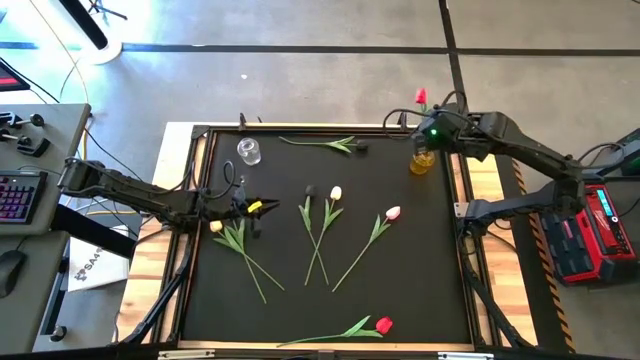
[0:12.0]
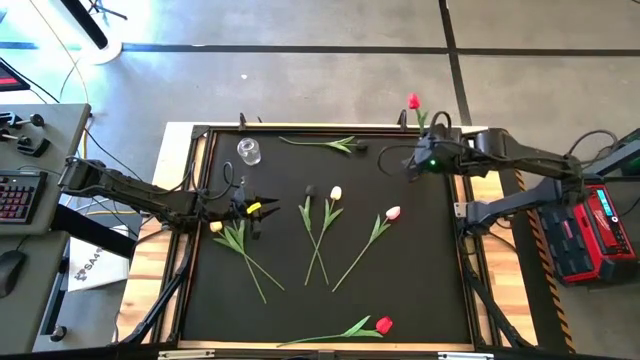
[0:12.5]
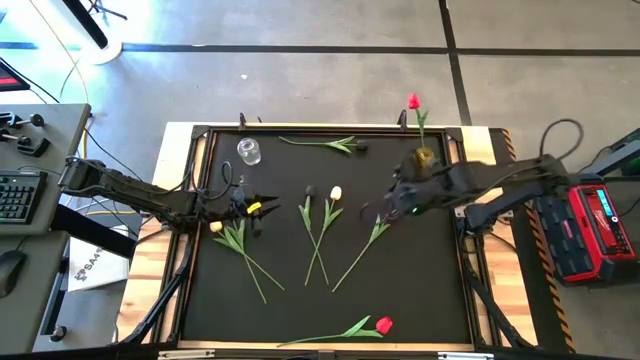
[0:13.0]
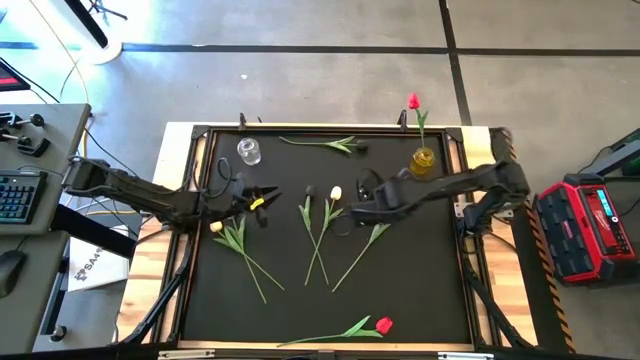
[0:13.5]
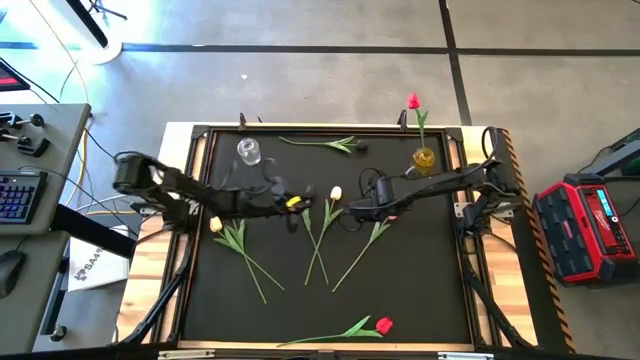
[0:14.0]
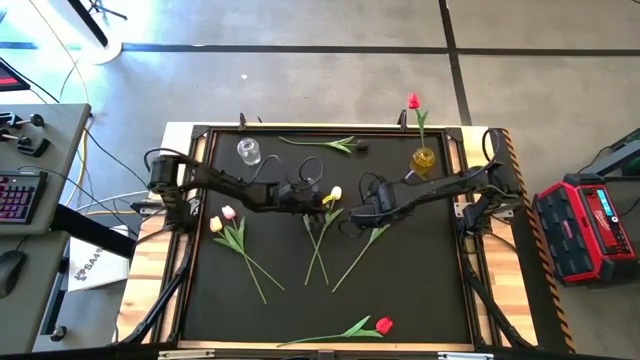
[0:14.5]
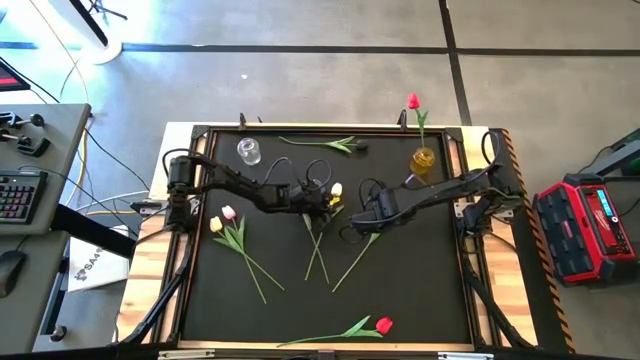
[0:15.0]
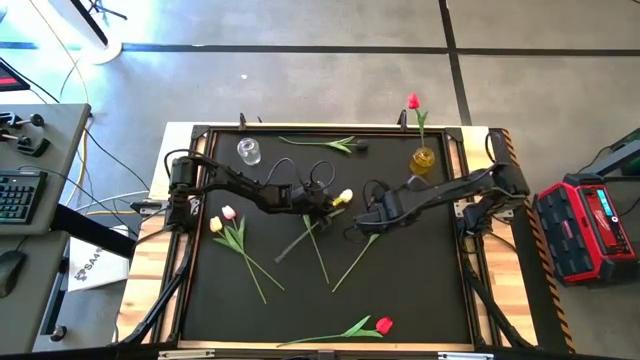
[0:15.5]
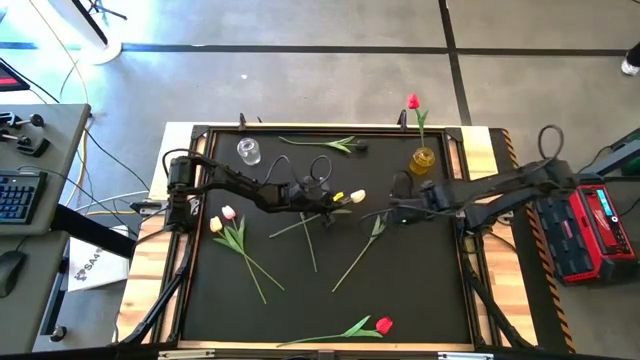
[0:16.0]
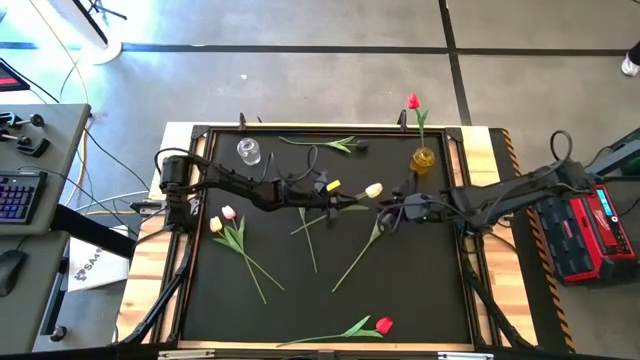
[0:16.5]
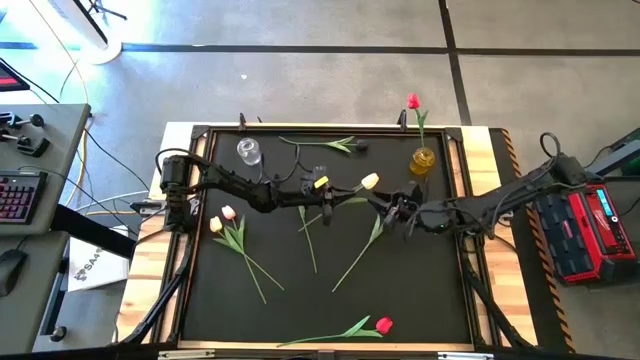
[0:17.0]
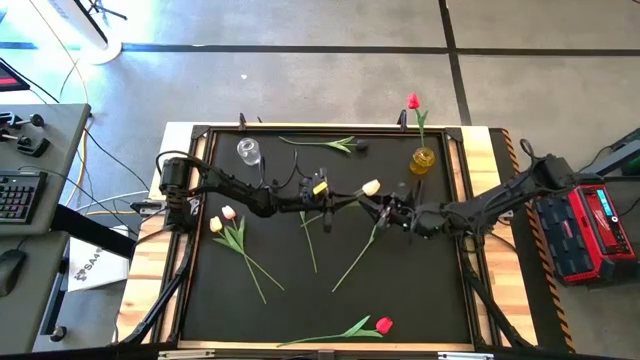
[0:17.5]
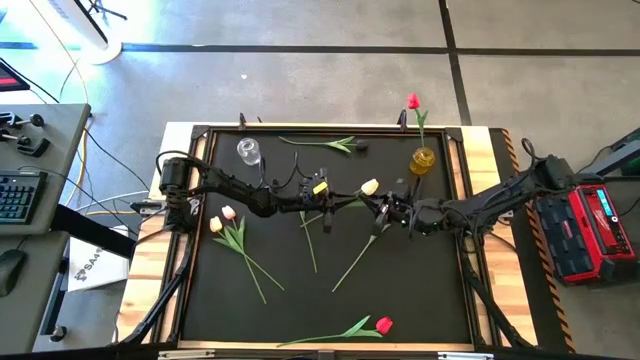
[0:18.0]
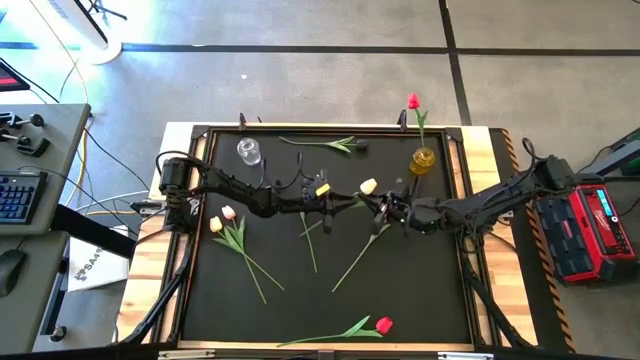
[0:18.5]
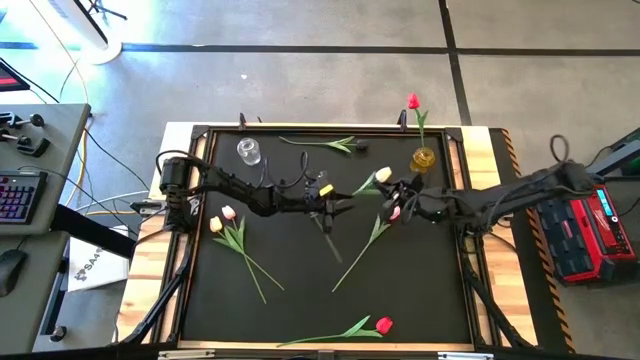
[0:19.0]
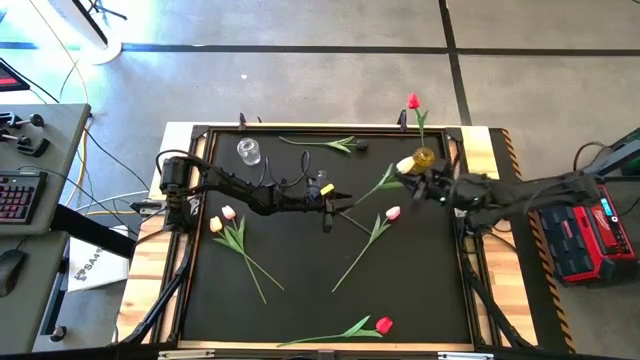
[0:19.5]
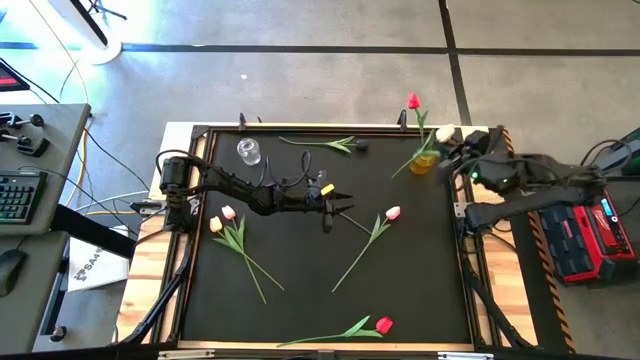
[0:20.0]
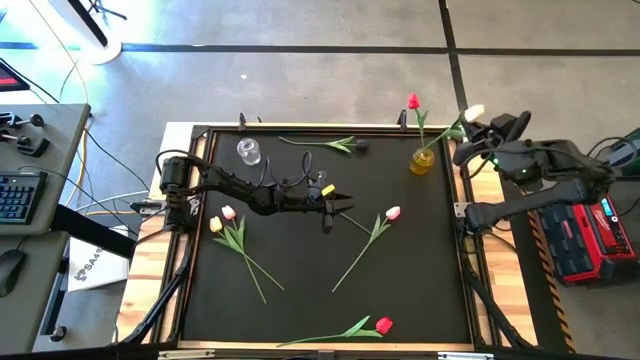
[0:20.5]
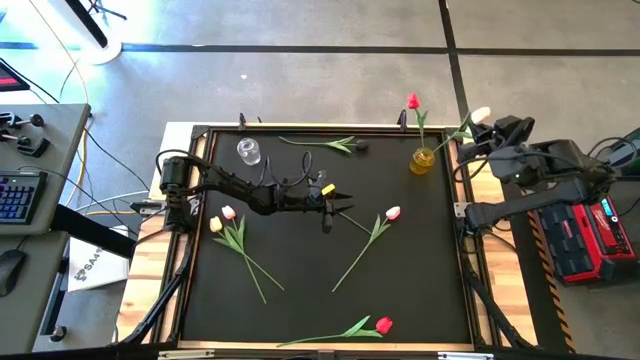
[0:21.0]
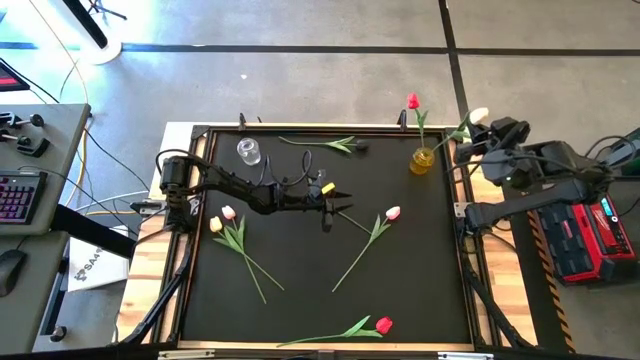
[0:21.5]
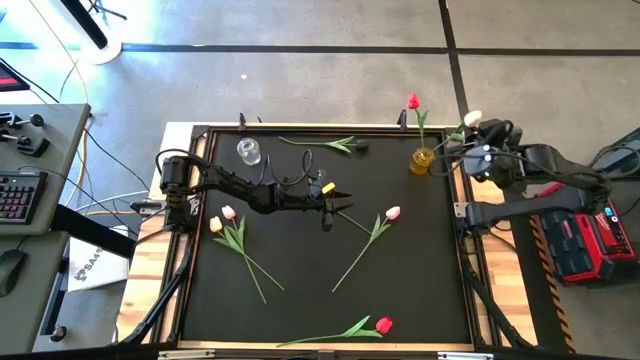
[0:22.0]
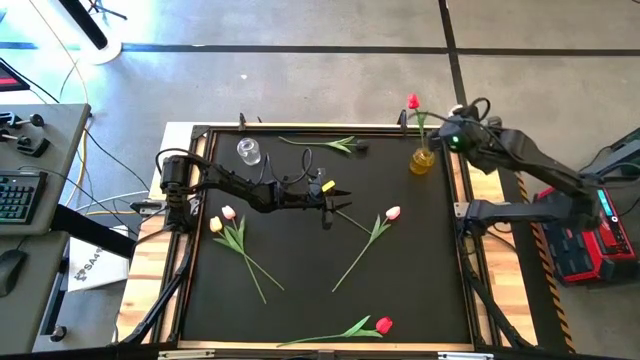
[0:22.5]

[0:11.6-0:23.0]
Task: Sort flowers into vase by color
Put the right orange flower into the yellow flower vase

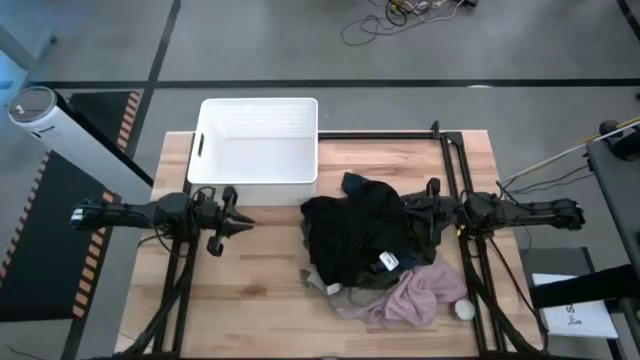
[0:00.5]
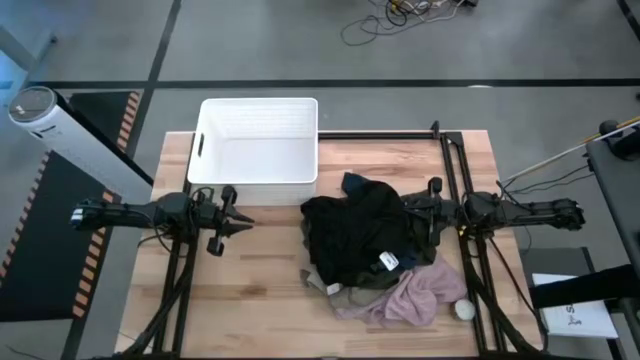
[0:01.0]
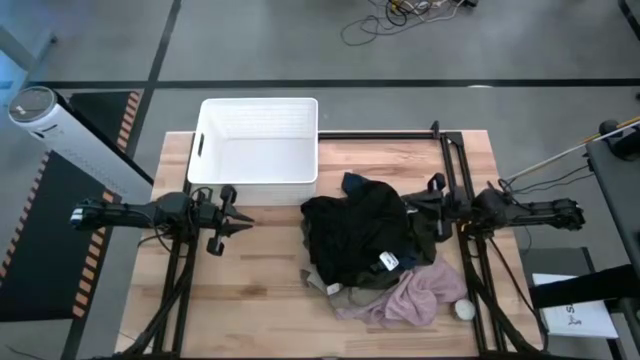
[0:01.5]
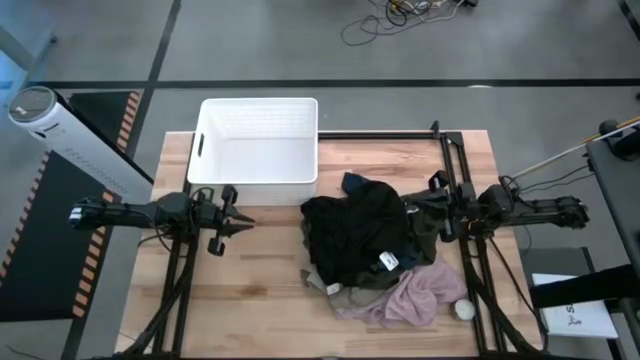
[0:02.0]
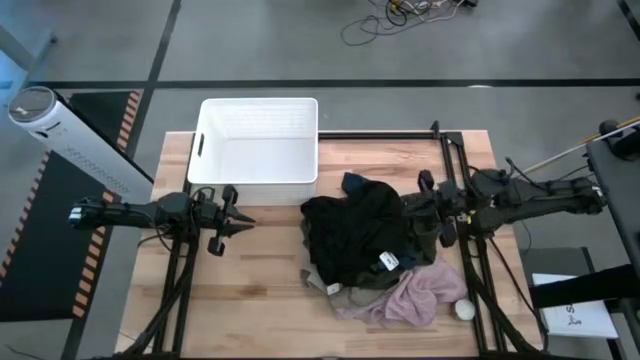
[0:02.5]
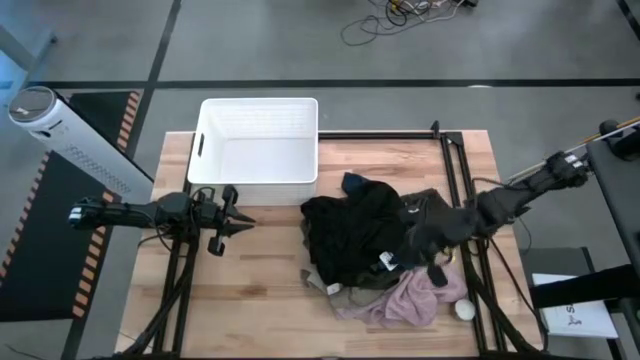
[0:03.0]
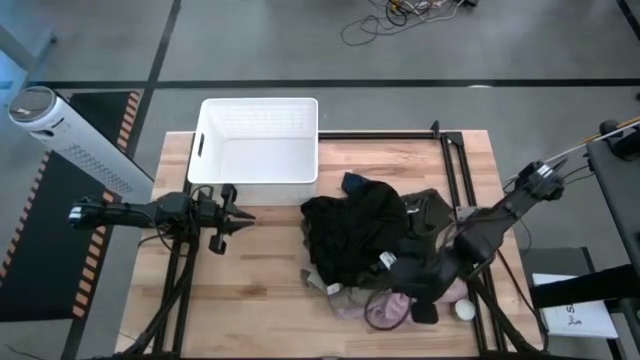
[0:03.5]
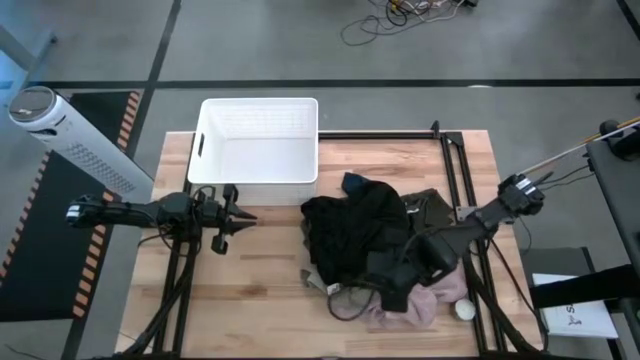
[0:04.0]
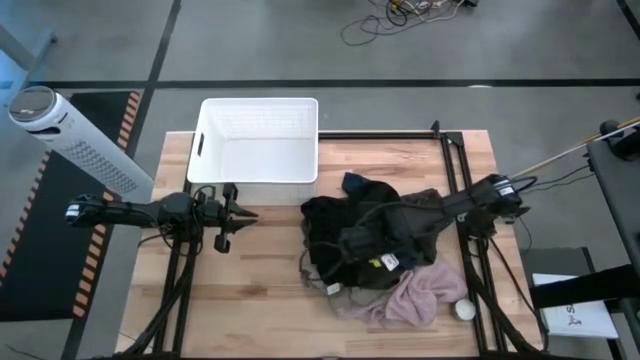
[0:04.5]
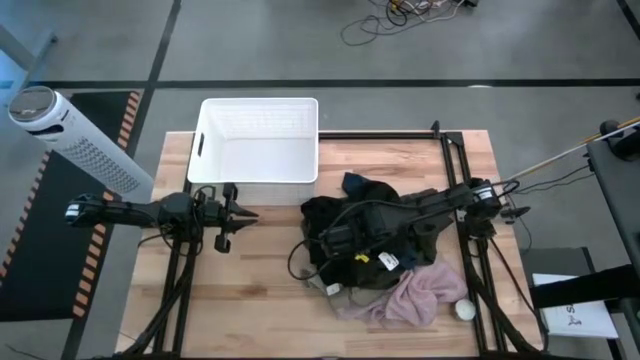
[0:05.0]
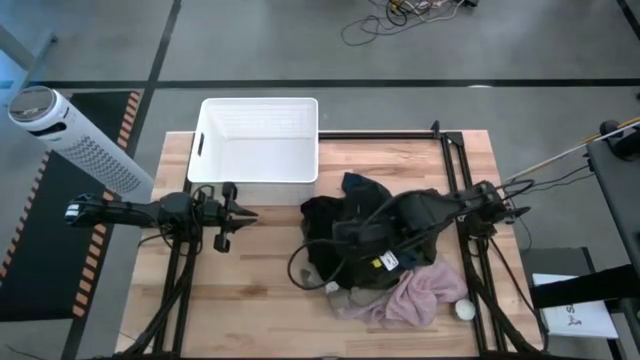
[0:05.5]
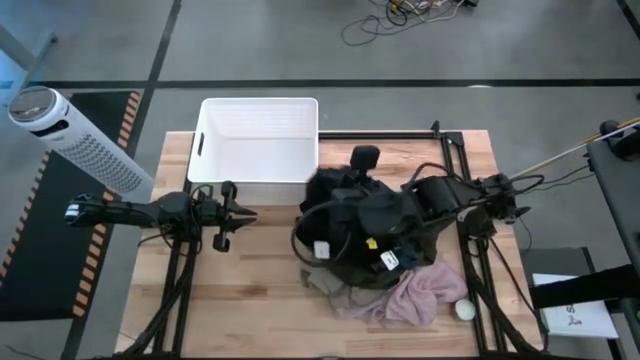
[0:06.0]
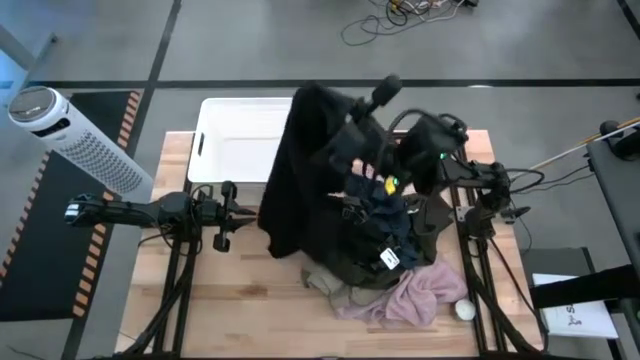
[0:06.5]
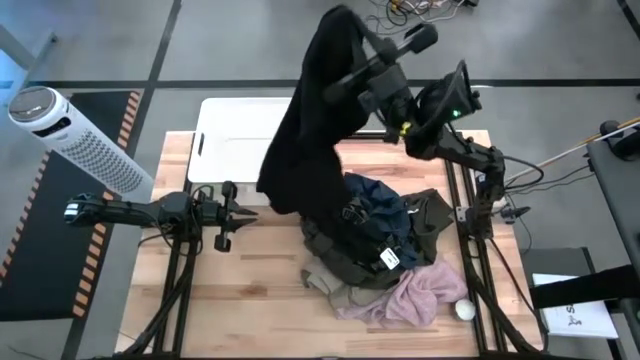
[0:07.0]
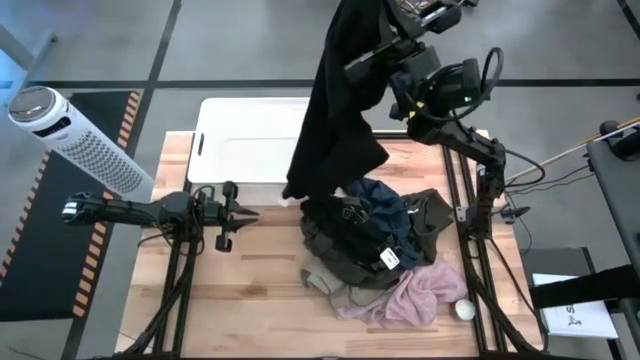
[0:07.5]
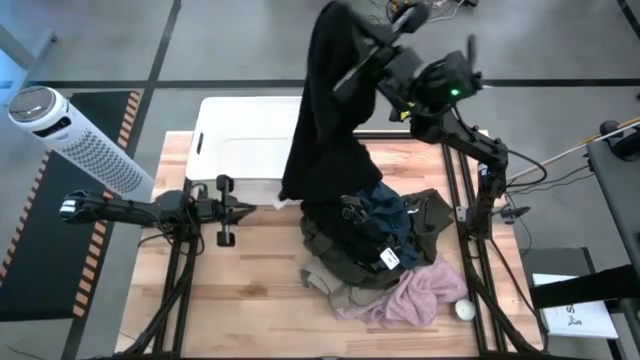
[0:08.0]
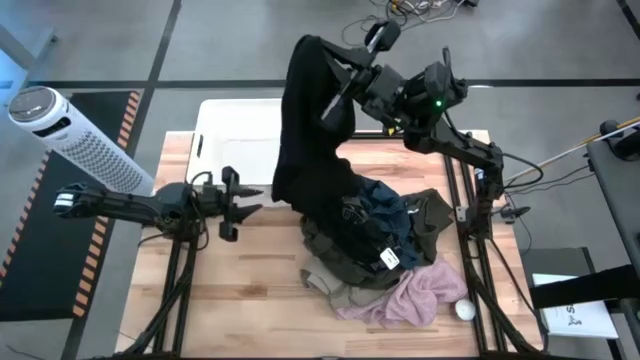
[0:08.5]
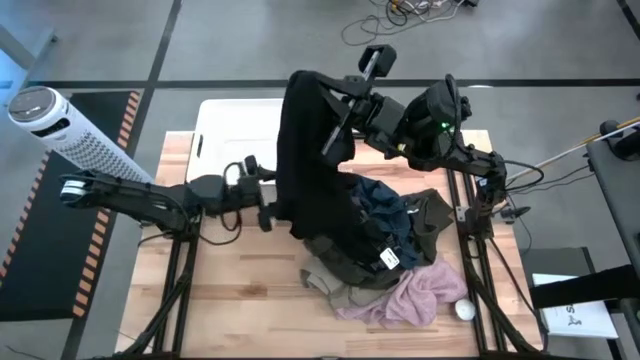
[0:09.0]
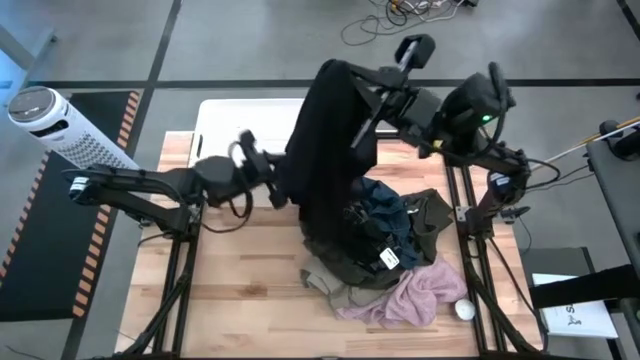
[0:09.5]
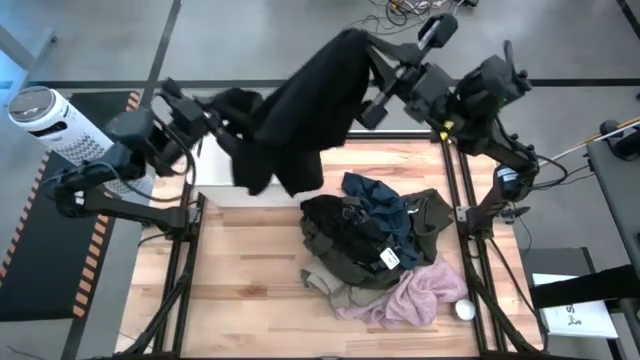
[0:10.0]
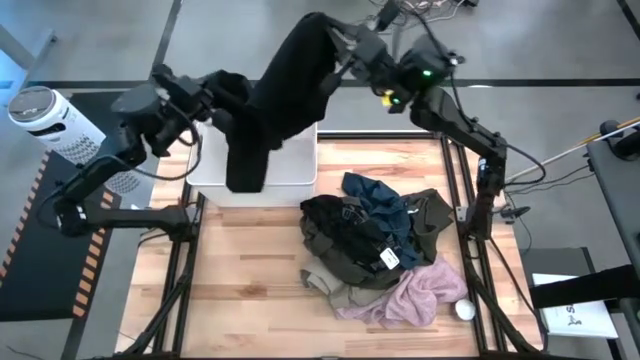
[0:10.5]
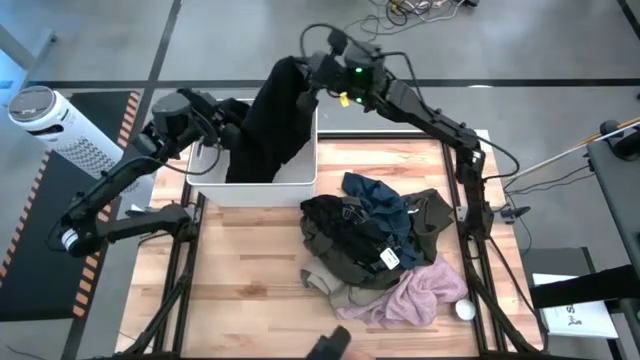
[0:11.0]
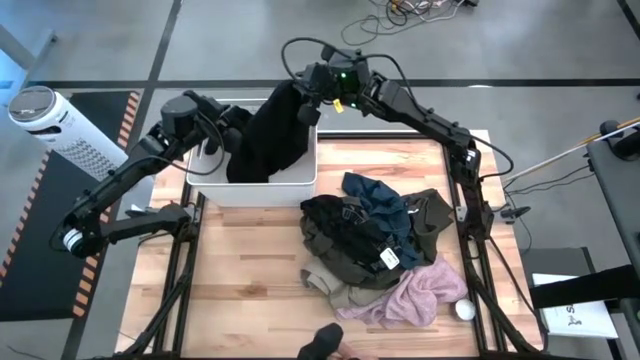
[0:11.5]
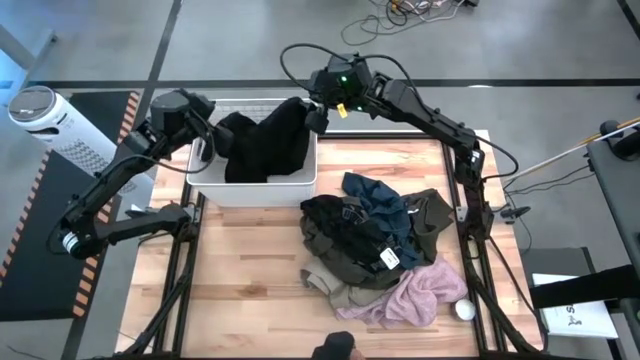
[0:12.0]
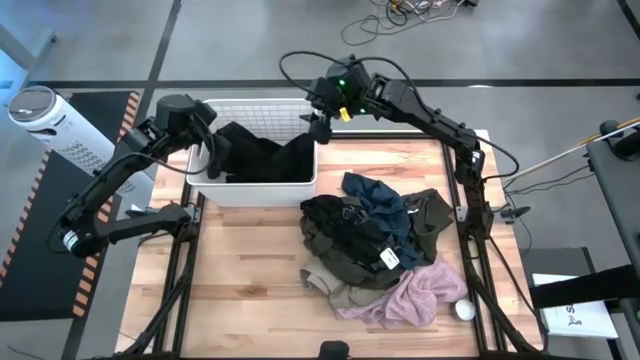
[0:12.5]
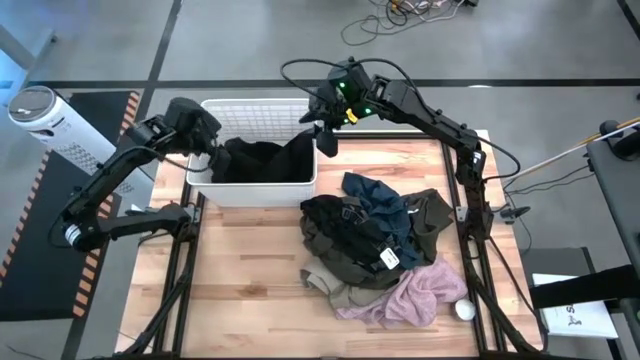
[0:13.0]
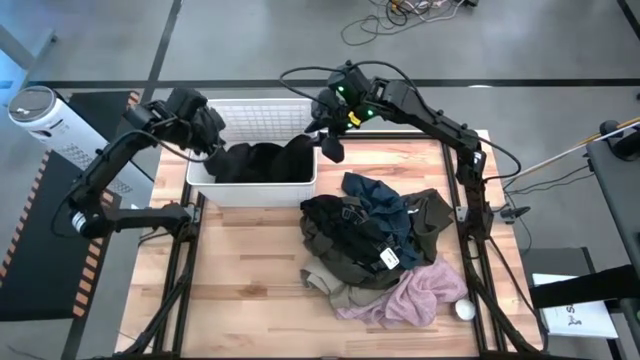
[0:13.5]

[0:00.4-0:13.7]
Task: Sort clothes
Put the black shirt into the white bin
